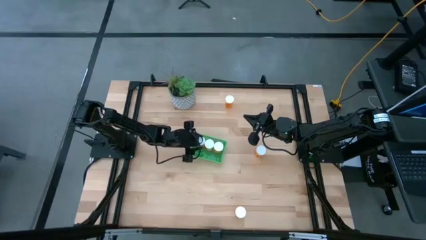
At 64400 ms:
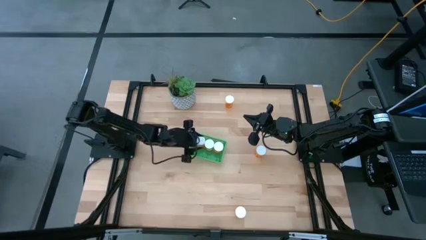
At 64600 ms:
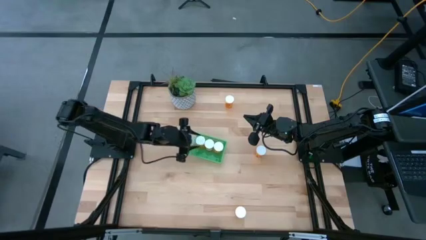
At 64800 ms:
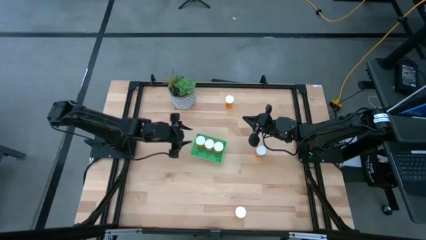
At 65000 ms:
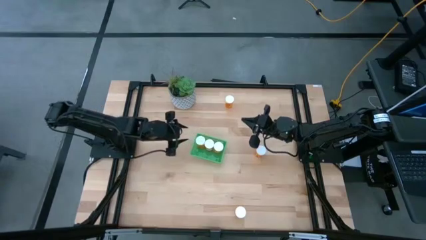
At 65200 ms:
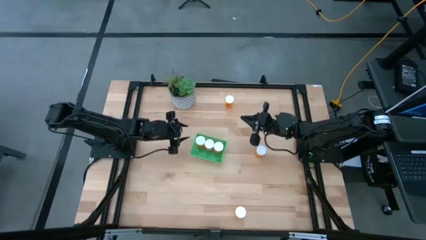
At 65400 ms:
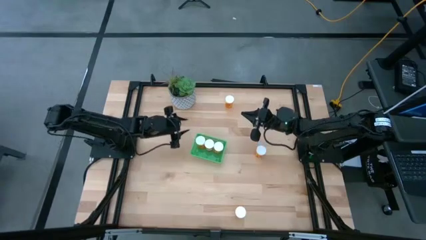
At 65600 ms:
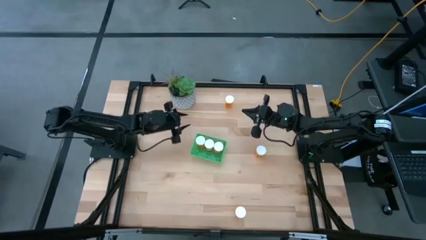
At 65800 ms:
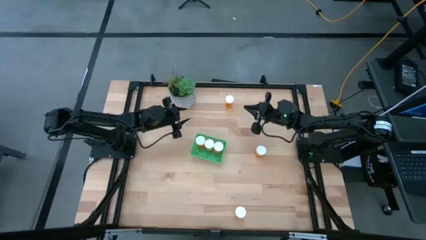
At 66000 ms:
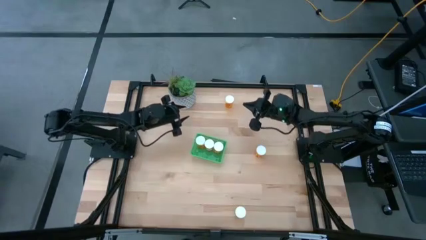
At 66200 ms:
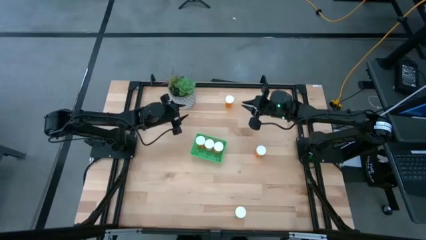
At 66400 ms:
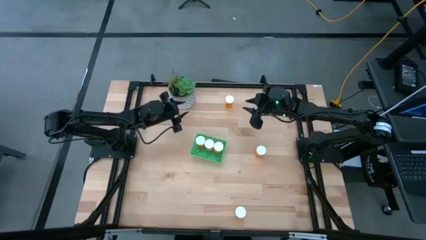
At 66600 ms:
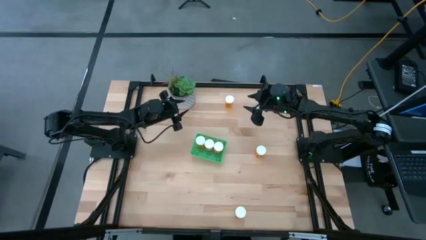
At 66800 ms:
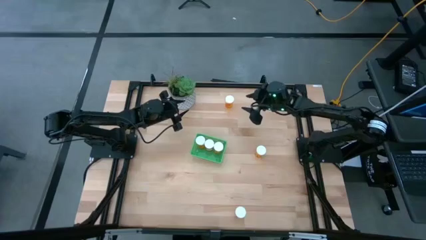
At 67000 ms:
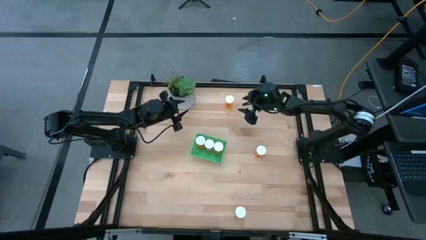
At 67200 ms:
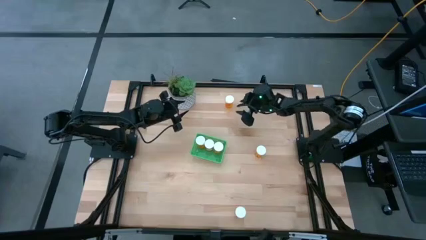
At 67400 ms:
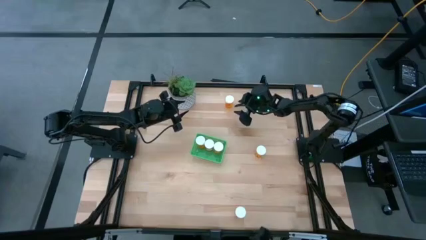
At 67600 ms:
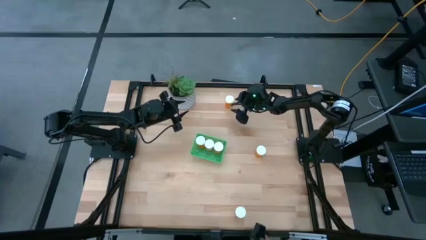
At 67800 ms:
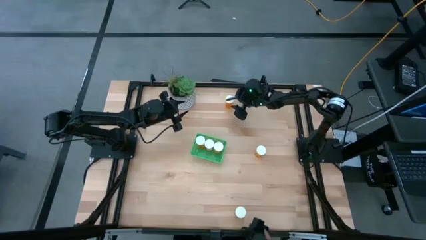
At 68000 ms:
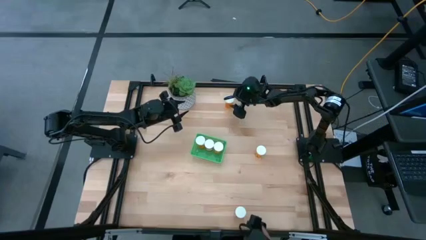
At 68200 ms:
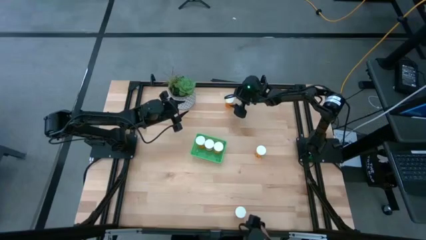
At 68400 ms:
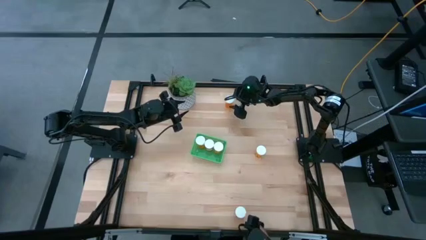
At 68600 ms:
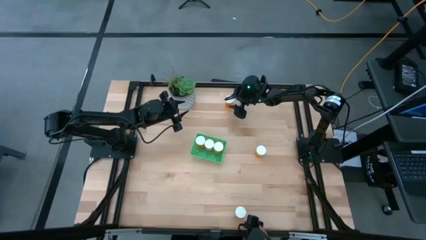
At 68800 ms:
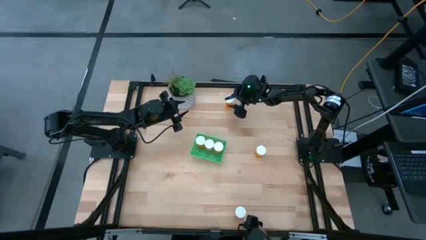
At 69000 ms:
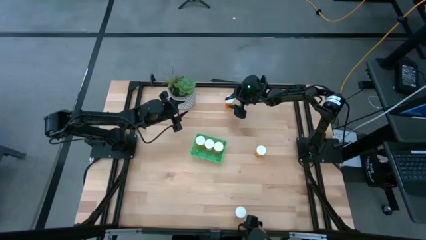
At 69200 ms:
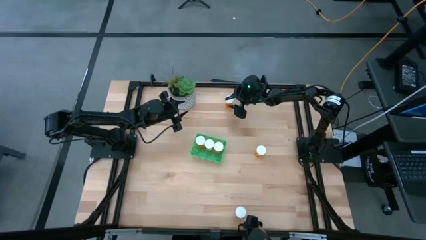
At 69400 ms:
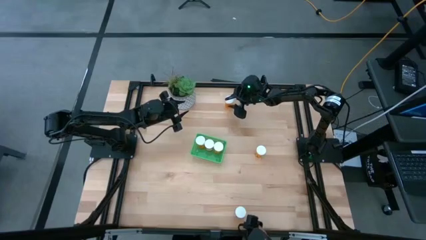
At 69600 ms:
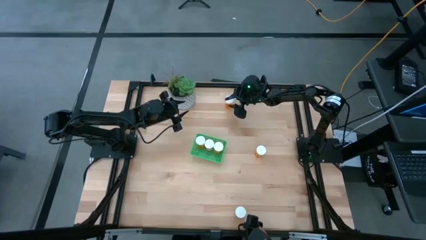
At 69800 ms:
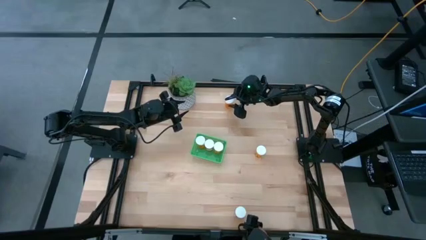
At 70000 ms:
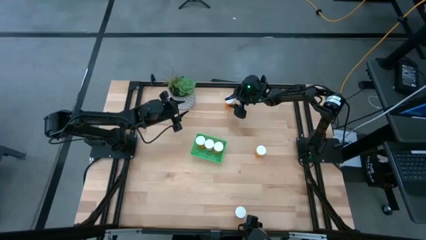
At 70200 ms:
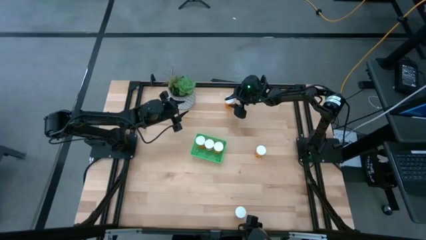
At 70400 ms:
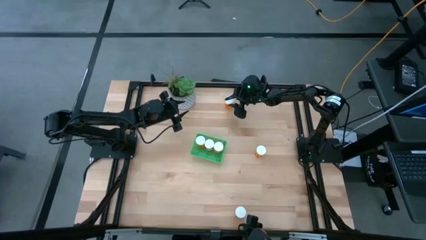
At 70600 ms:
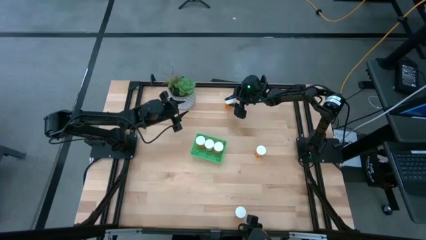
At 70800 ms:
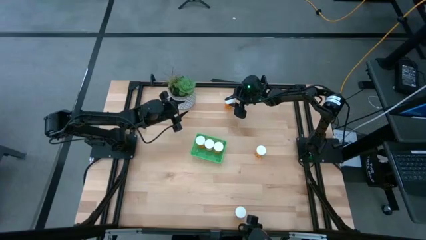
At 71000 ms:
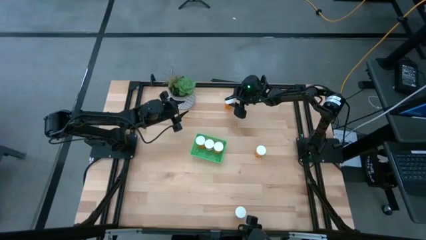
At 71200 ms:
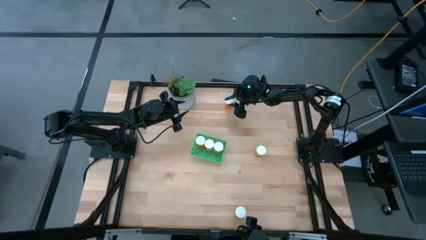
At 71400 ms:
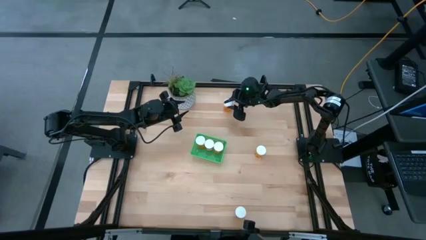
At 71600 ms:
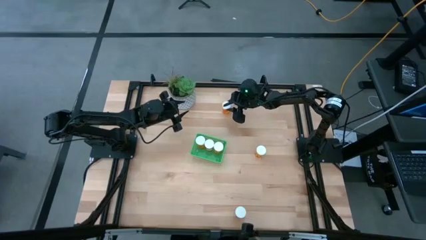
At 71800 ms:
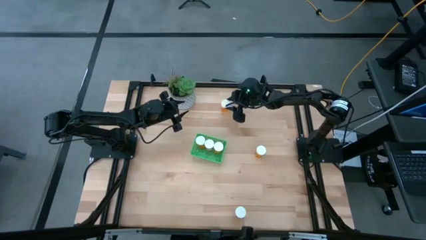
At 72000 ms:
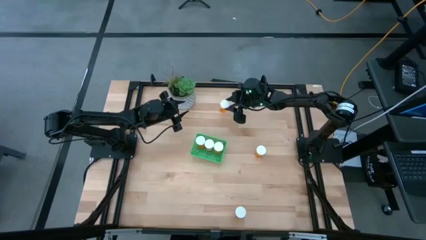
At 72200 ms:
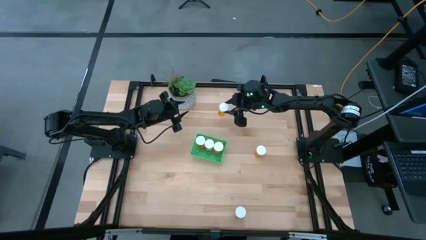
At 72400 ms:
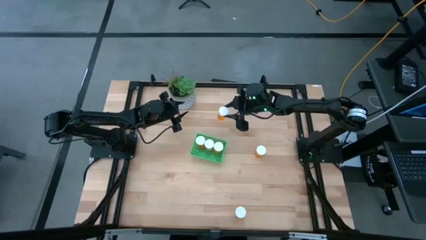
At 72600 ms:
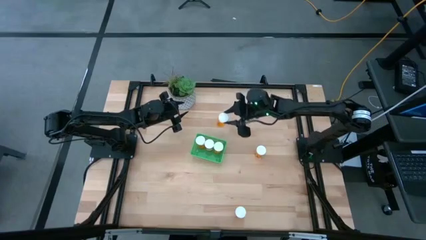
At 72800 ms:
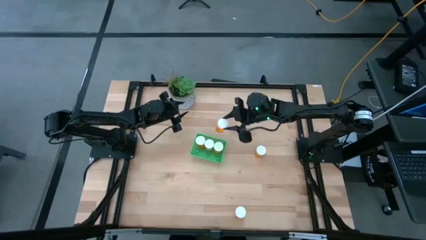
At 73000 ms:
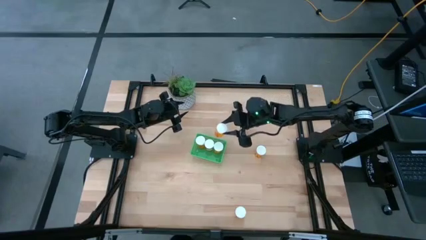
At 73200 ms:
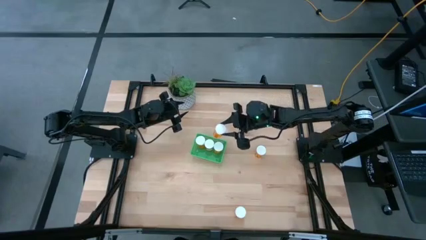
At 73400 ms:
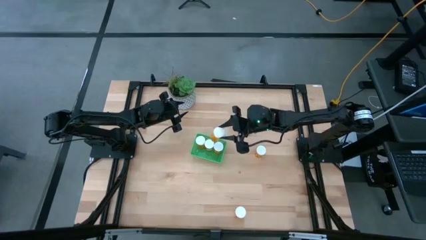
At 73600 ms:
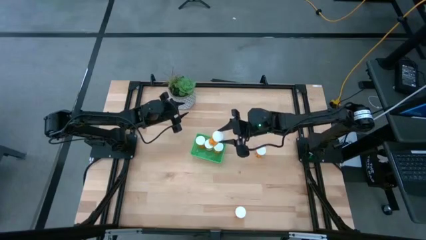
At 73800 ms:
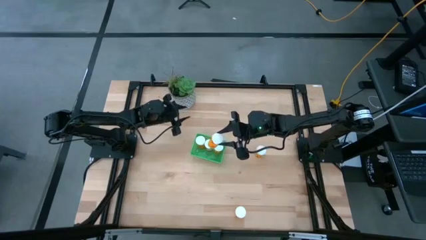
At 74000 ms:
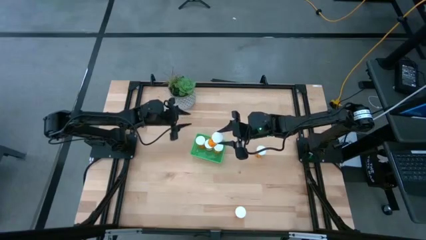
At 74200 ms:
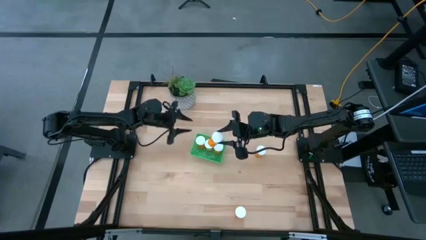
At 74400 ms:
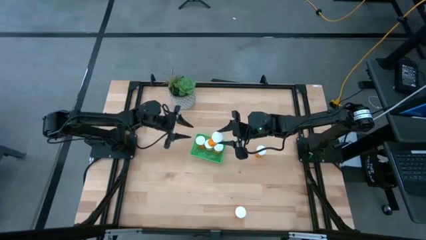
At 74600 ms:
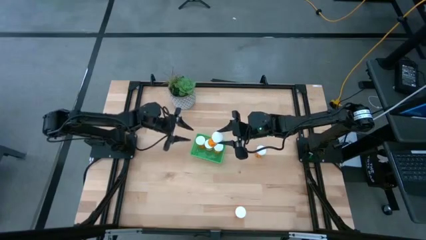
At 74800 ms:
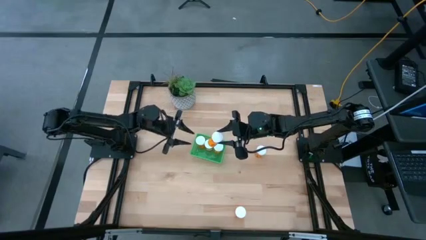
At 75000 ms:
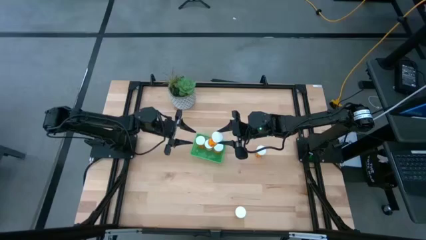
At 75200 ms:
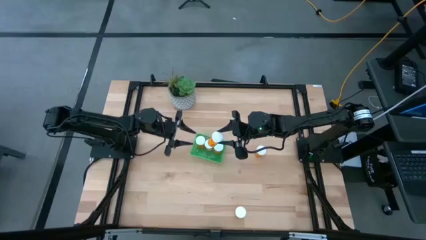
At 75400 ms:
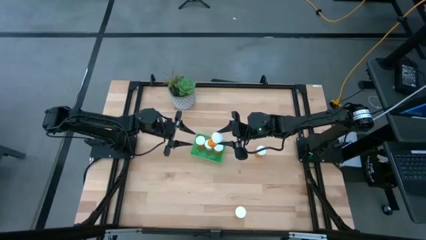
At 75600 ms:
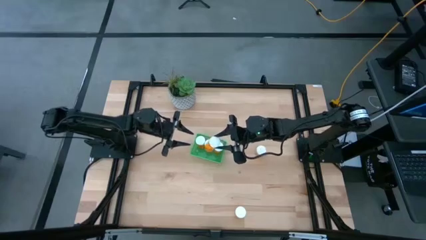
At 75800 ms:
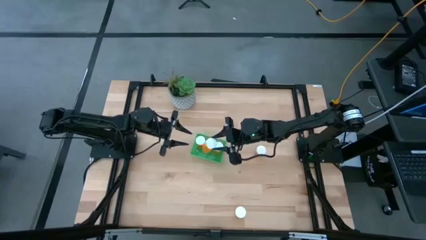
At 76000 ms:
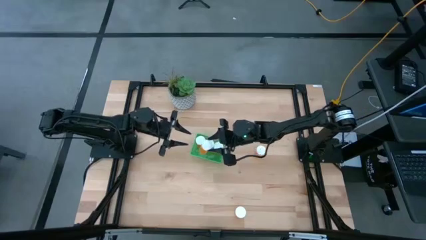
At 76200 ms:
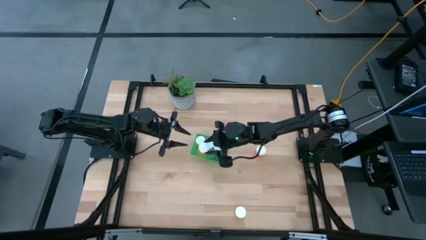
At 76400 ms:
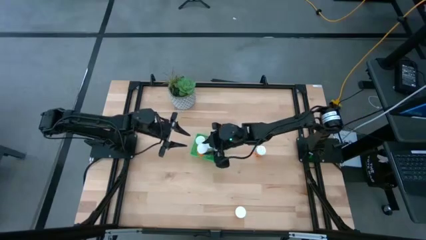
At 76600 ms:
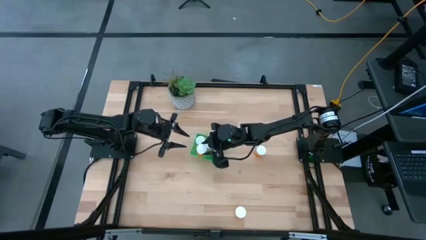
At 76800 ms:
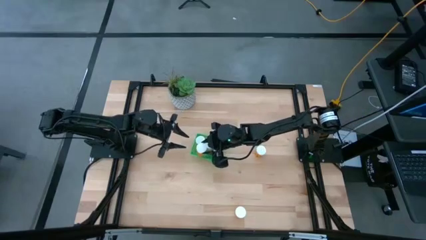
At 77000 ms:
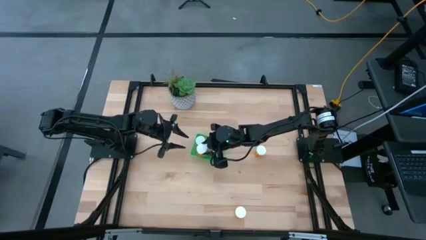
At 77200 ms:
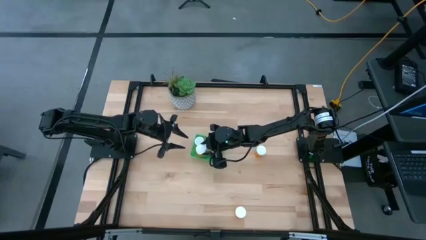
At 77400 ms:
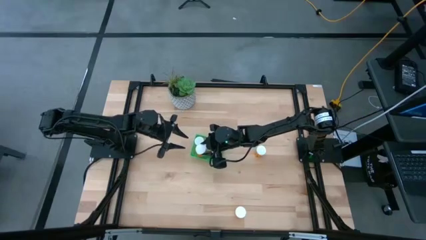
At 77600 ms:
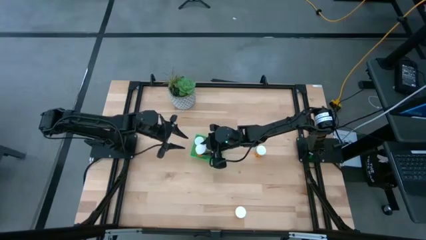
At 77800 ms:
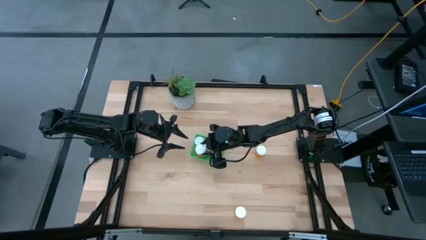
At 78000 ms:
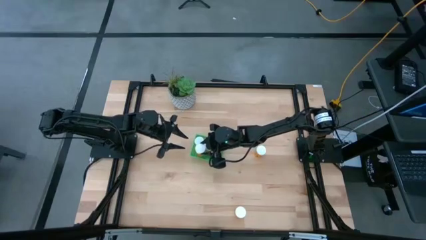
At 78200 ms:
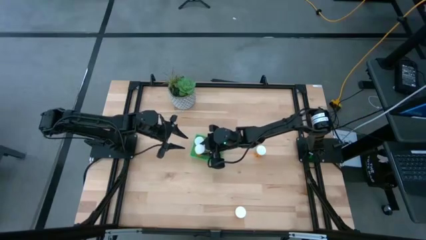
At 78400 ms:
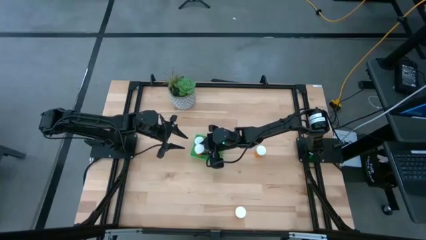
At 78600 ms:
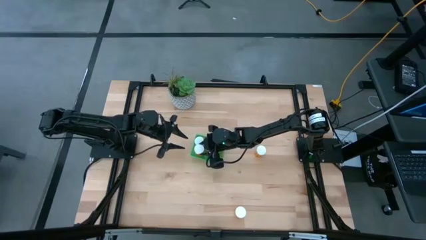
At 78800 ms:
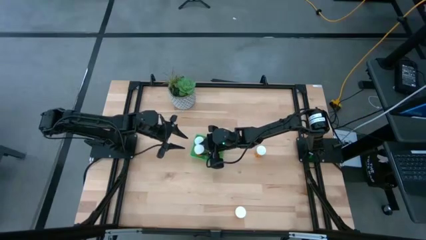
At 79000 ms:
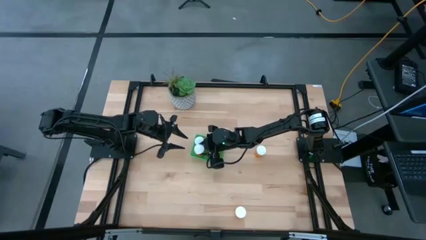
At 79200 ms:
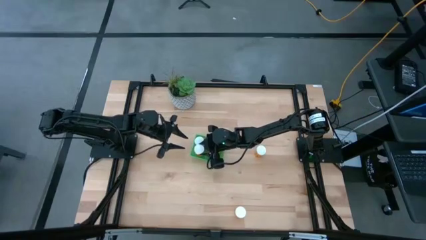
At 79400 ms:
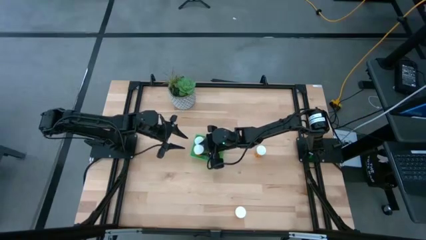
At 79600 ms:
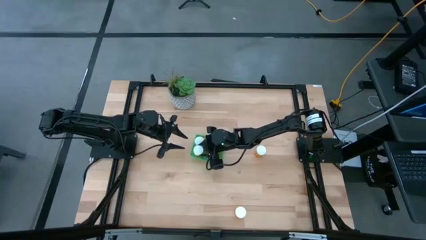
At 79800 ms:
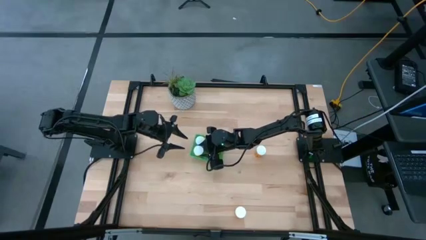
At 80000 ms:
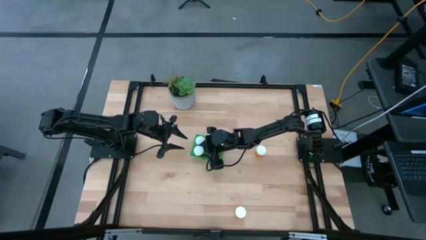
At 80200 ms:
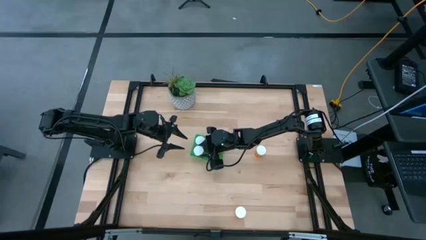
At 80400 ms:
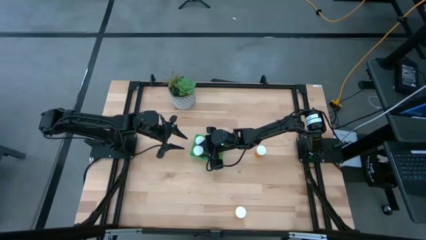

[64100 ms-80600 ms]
Task: Pick and place pill bottles into a basket
Put the orange medicine bottle into the green bin
